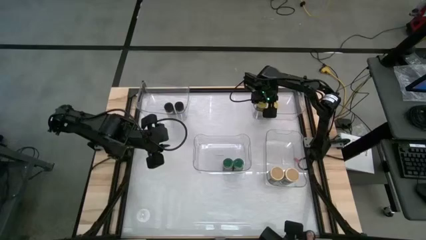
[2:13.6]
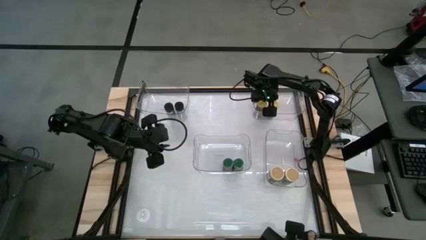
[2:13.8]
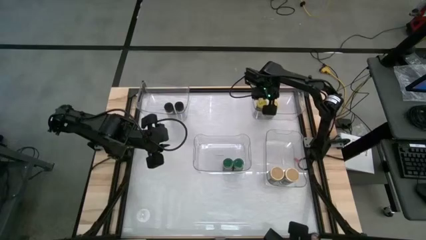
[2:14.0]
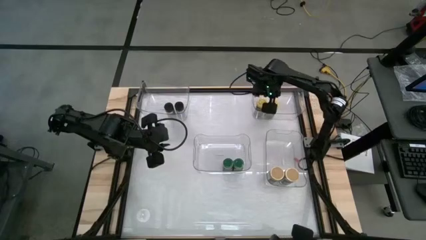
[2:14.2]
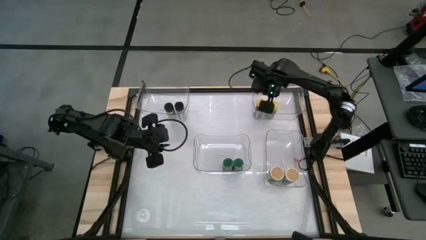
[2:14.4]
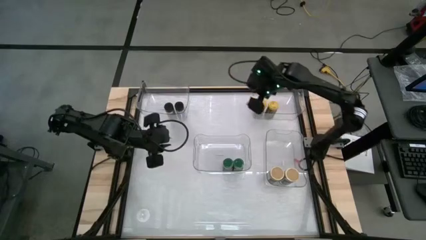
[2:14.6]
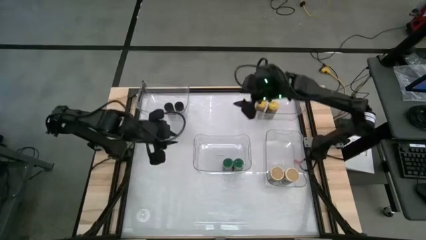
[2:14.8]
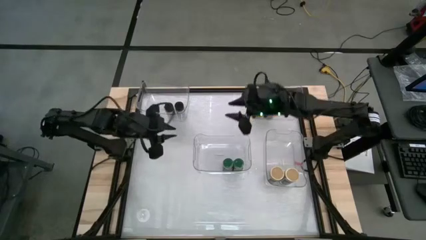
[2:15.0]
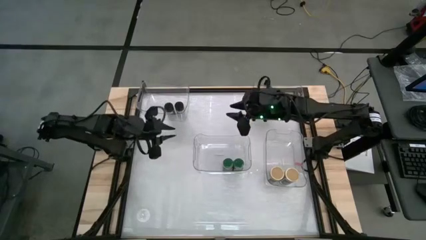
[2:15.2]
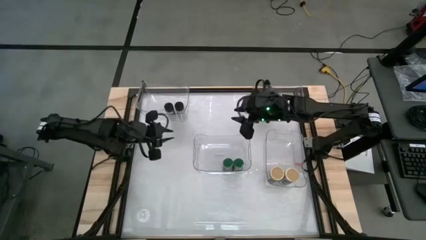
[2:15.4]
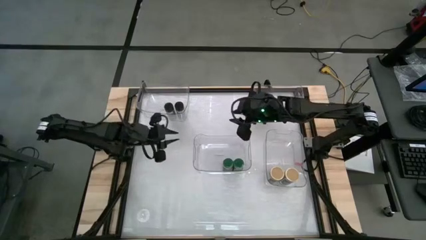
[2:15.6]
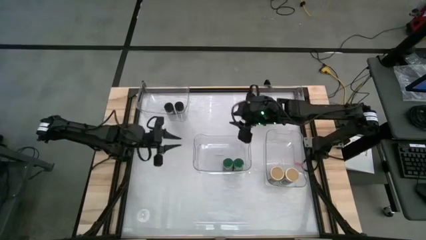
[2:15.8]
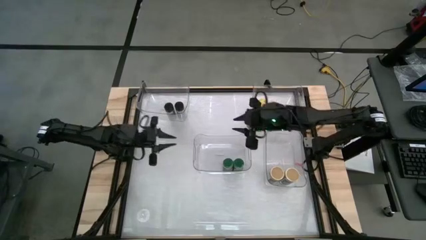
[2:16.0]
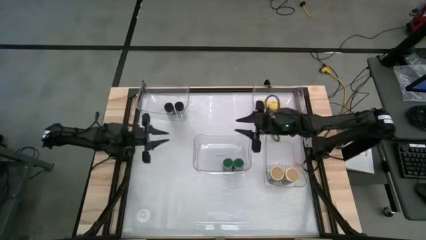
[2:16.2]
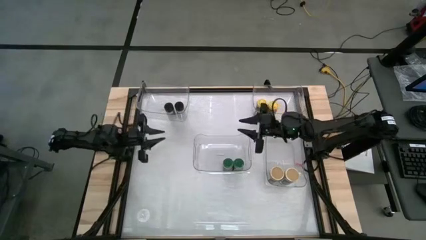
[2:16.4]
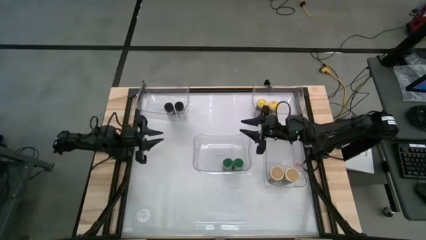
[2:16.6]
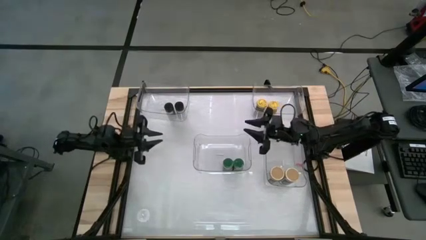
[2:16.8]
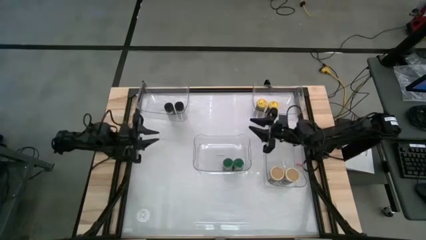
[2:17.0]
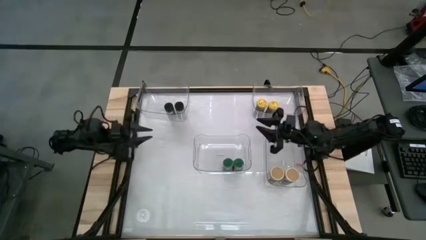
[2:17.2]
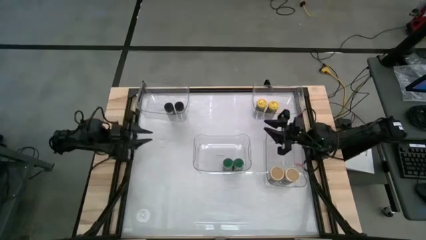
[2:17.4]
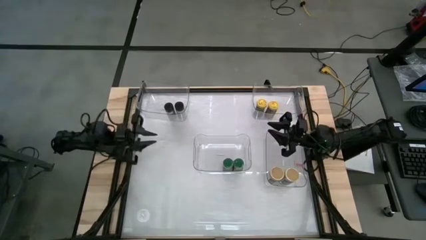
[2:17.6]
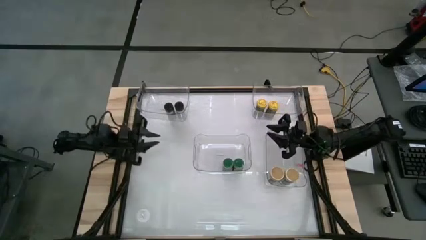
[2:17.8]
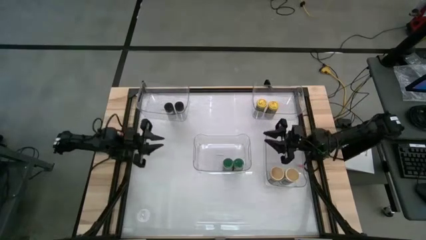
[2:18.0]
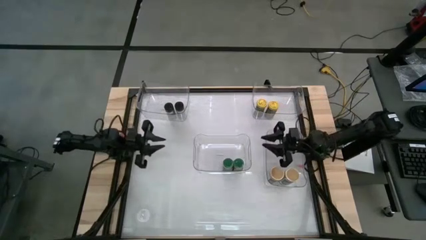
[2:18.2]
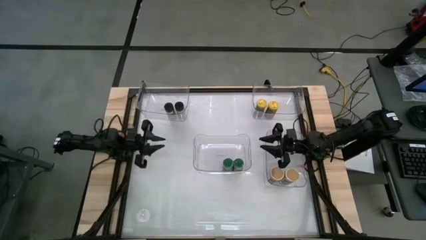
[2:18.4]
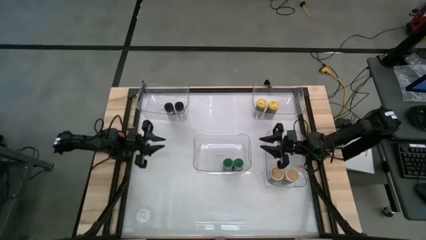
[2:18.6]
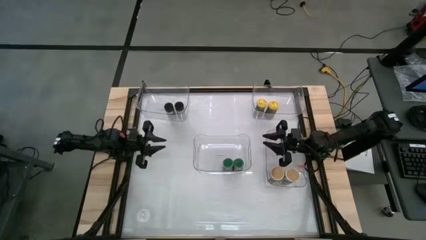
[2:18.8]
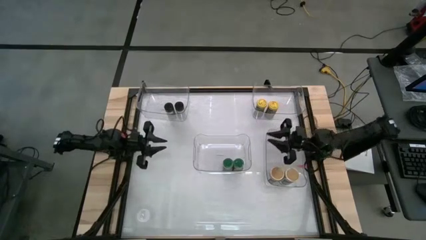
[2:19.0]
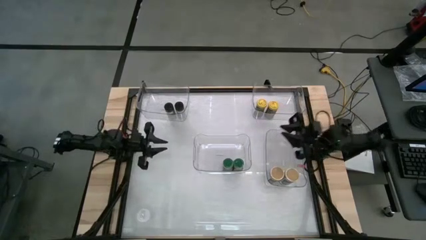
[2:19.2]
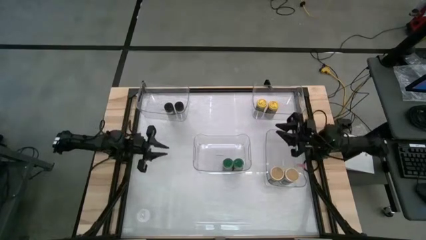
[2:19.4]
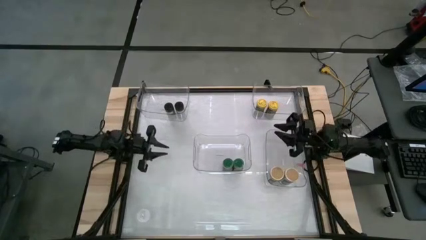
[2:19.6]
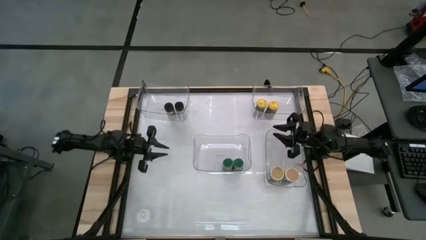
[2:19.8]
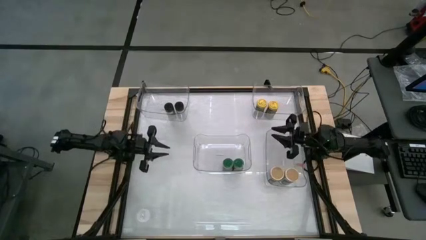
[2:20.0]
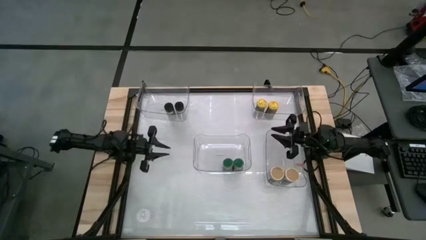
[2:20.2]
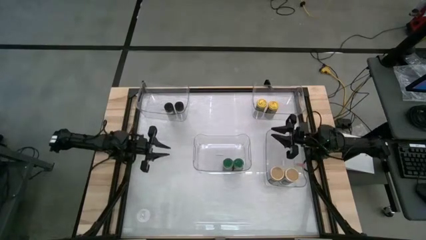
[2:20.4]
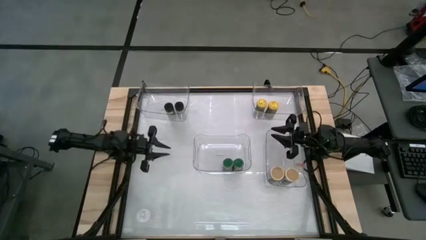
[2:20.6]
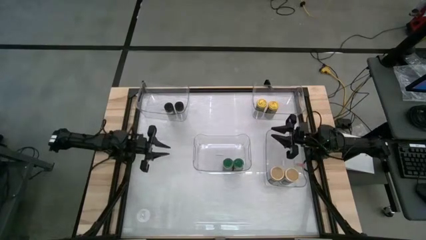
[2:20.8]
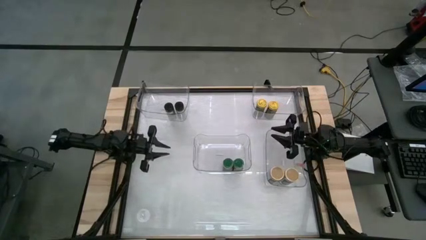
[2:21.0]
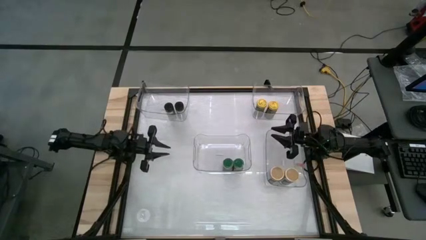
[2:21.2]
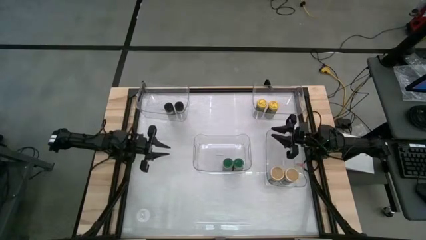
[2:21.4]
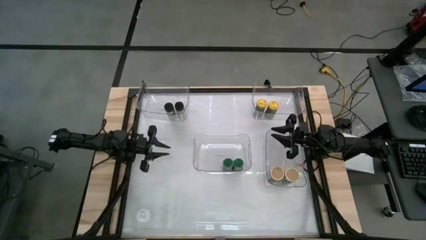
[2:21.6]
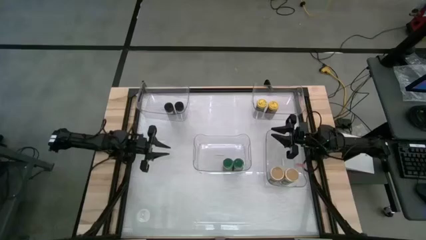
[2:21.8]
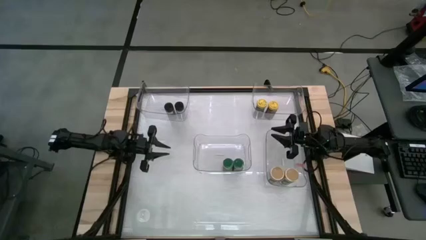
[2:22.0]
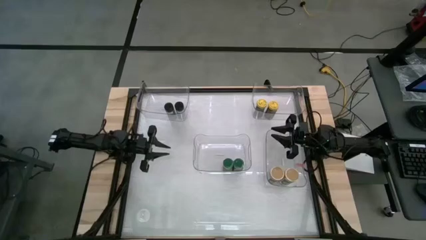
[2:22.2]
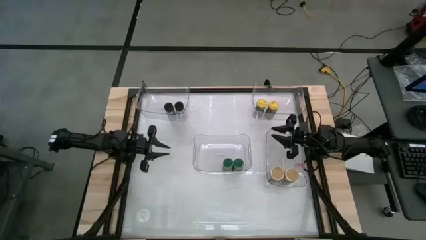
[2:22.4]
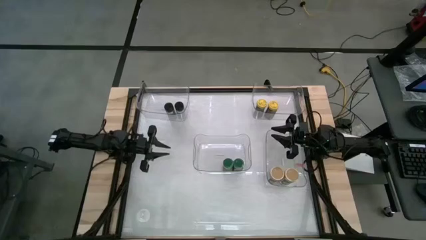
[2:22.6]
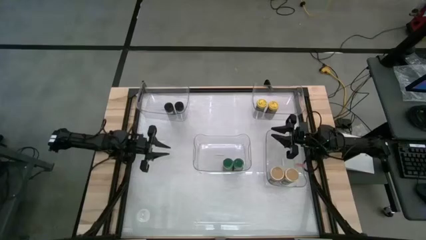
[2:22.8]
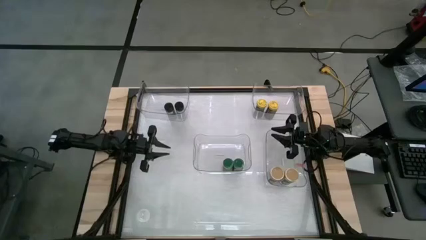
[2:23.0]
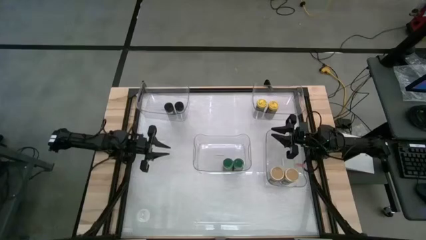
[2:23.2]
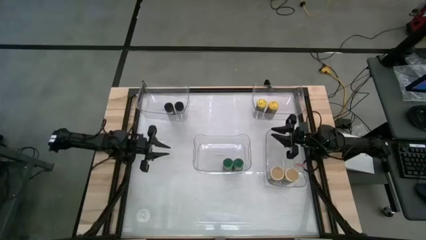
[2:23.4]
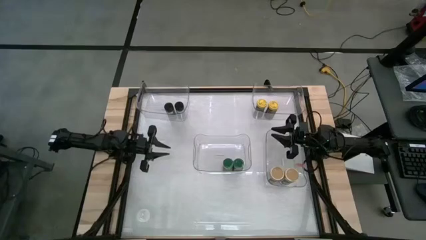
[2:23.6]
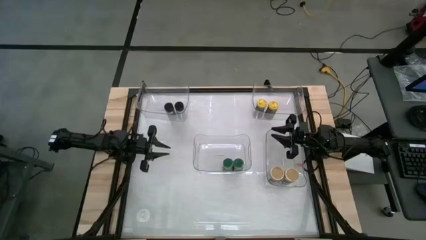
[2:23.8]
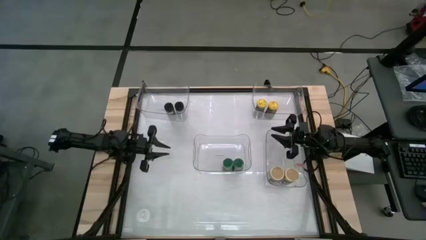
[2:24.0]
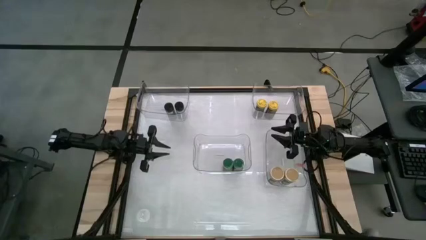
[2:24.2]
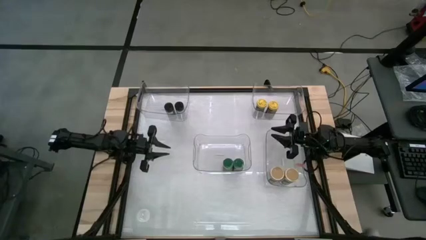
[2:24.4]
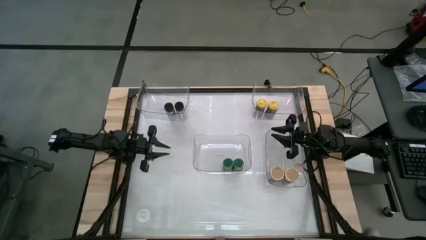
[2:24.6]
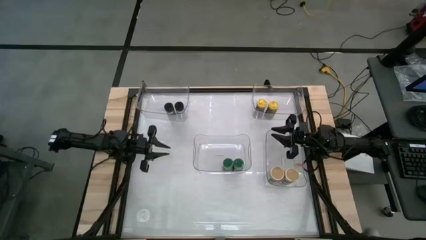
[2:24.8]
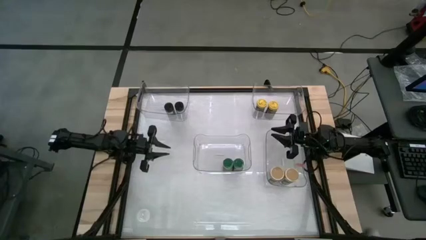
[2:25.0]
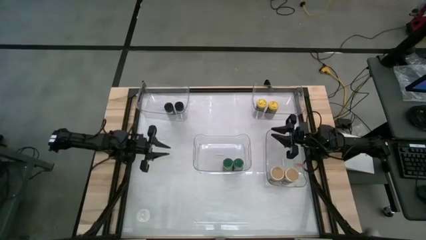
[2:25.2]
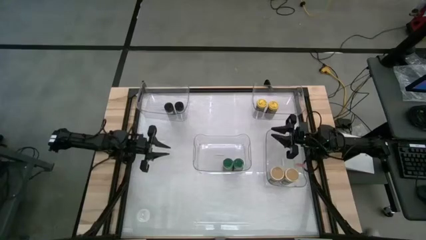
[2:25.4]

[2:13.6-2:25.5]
Task: Sort spices by type
Return to Home Position

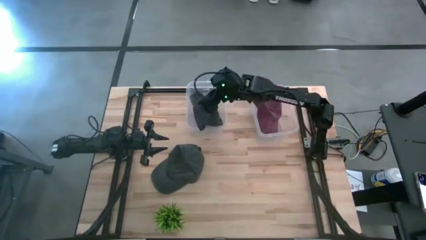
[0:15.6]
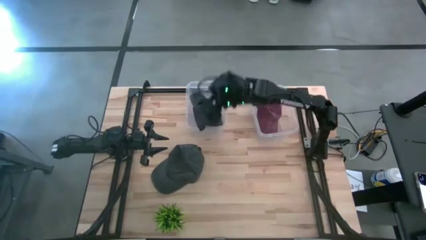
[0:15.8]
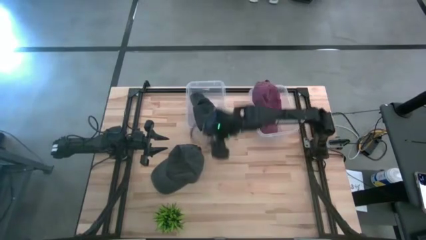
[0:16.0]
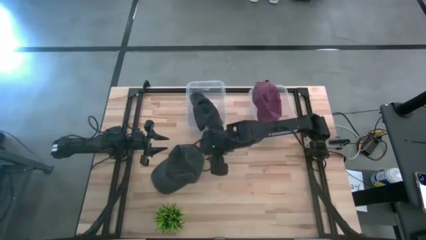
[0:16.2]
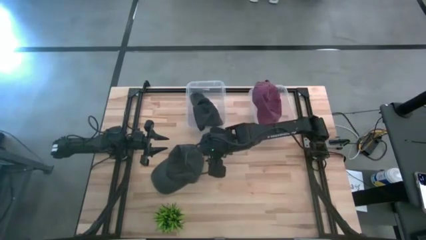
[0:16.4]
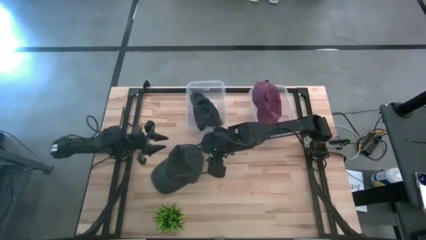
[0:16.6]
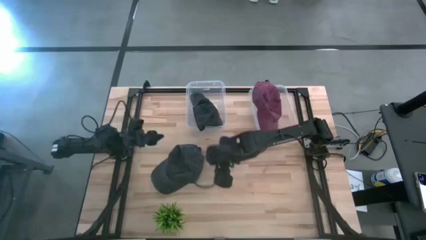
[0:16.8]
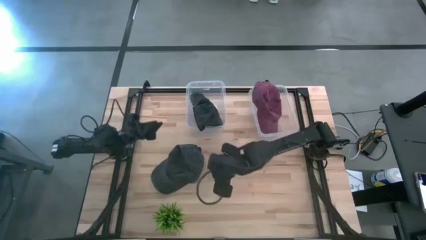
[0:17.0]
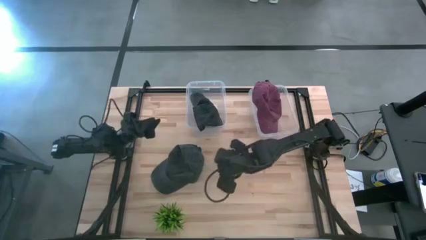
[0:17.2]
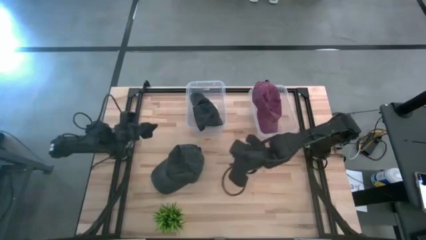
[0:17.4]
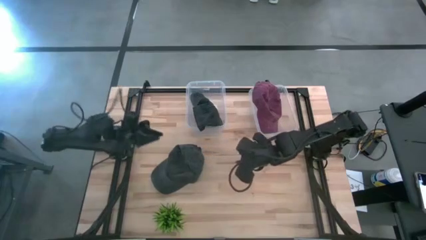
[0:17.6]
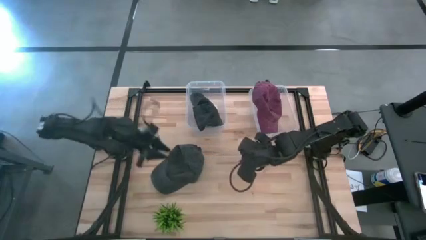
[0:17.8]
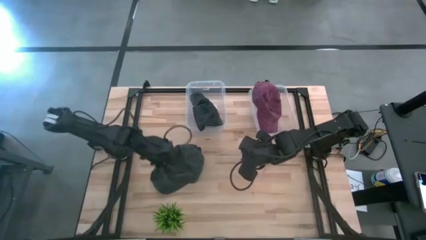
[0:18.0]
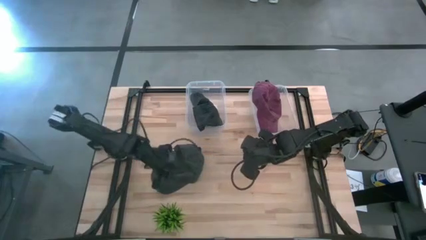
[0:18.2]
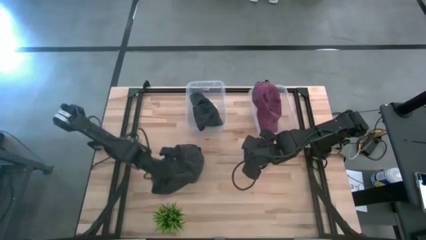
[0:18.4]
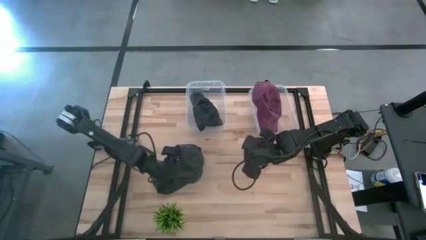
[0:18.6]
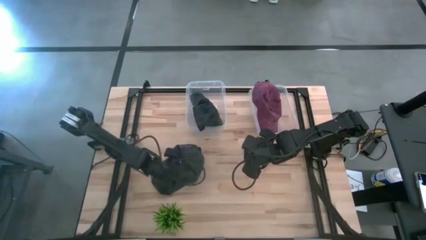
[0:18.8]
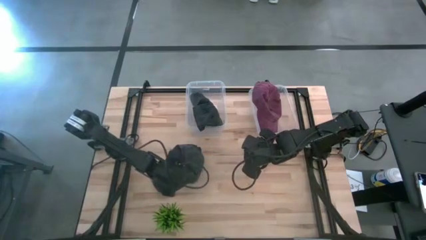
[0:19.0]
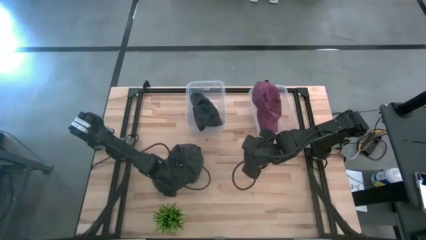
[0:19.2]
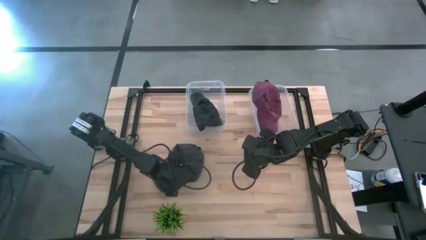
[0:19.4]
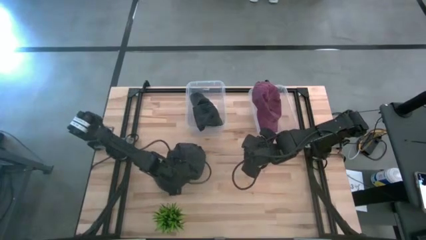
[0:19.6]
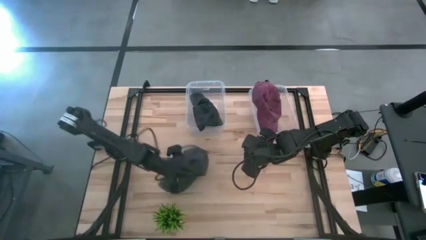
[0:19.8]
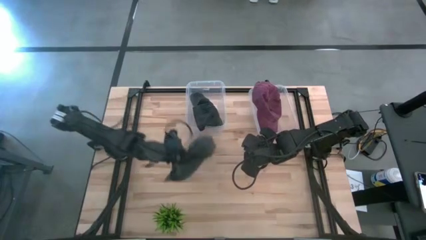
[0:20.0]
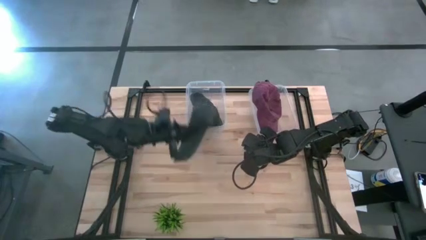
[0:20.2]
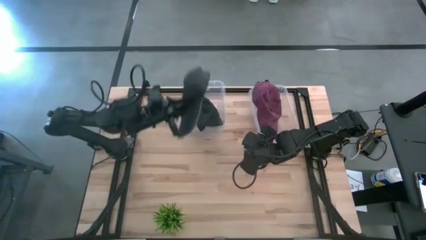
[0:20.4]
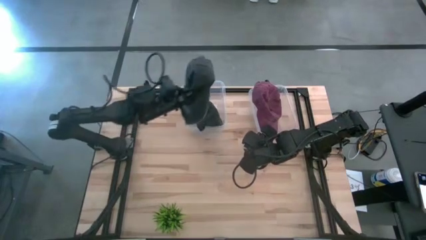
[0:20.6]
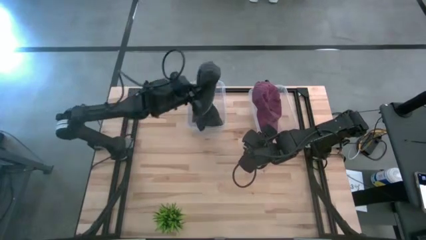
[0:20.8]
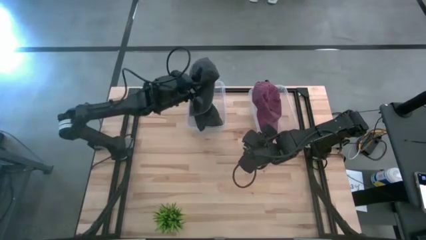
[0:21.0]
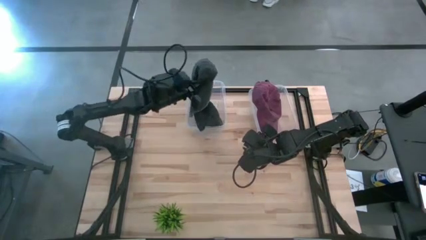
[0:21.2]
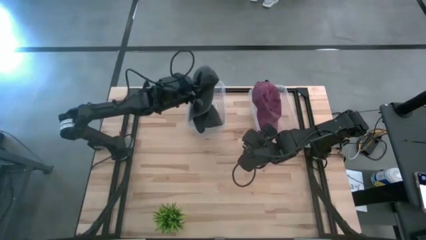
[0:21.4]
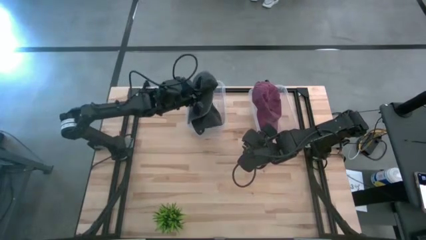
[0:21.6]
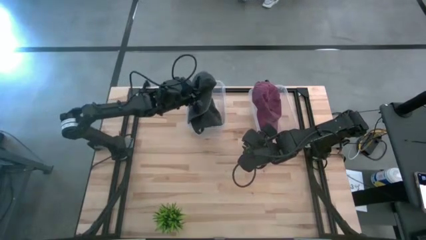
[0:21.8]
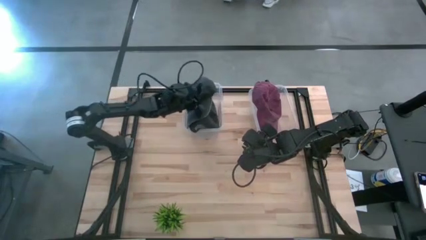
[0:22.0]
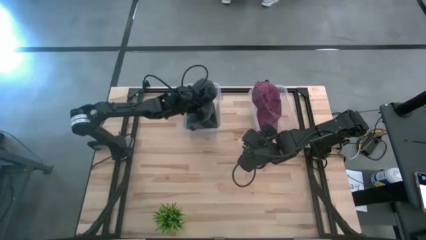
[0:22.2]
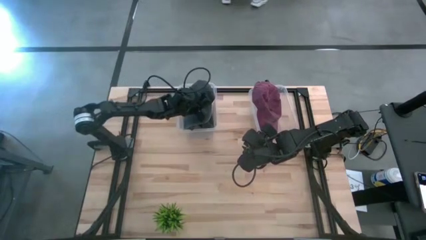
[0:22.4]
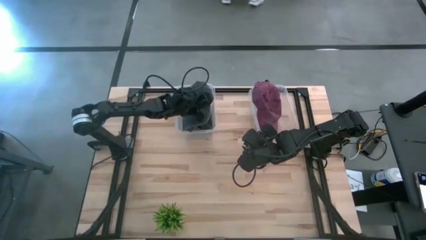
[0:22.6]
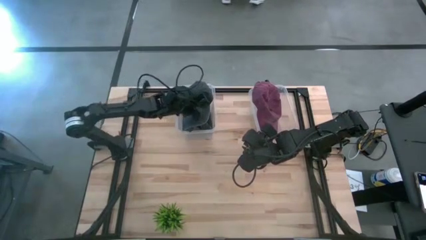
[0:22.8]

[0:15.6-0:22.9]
Task: Pick & Place hat
Put the black cap into the left transparent bin
